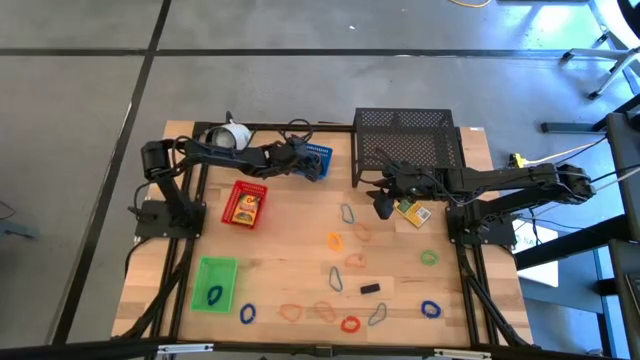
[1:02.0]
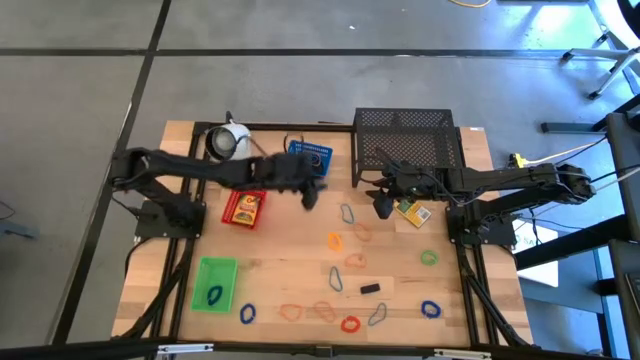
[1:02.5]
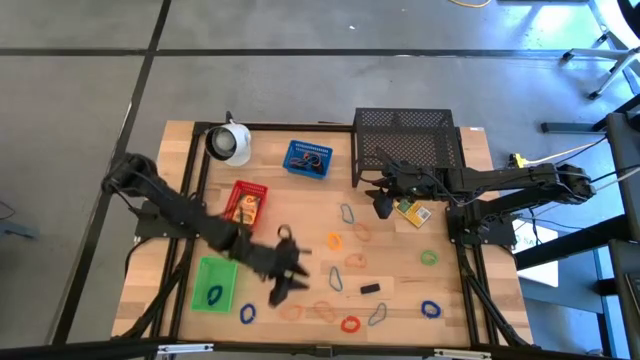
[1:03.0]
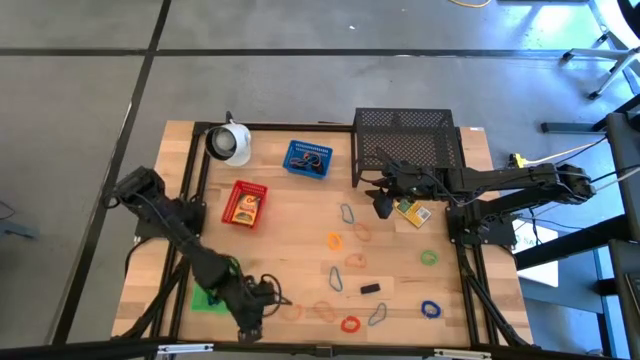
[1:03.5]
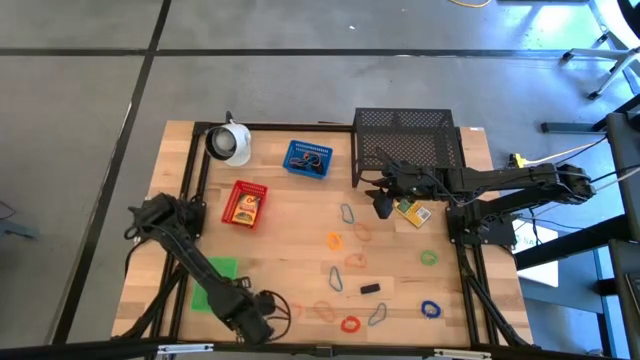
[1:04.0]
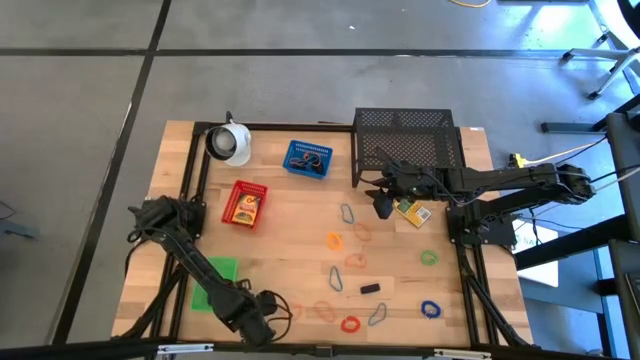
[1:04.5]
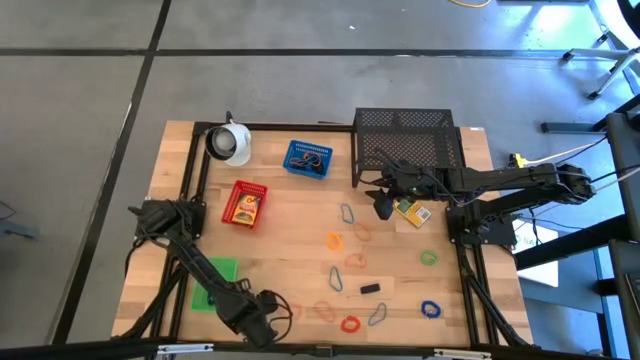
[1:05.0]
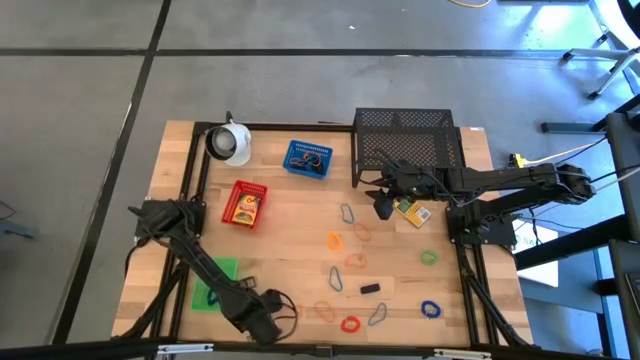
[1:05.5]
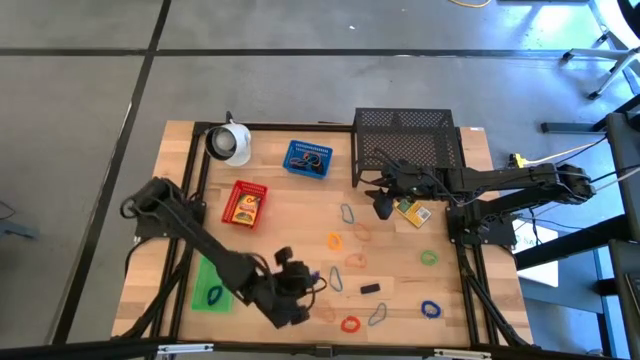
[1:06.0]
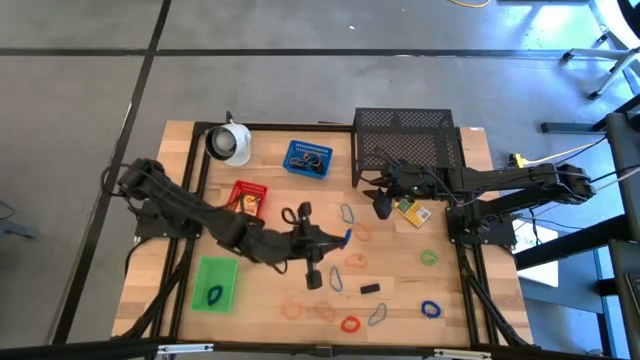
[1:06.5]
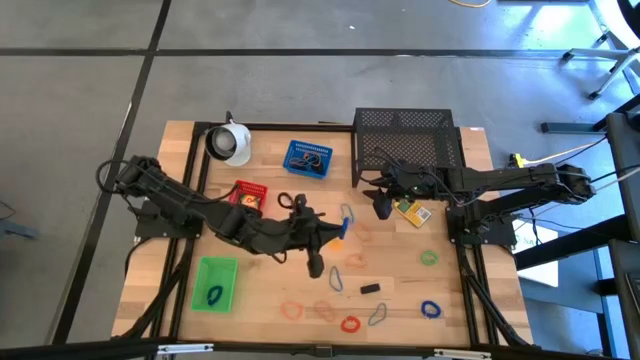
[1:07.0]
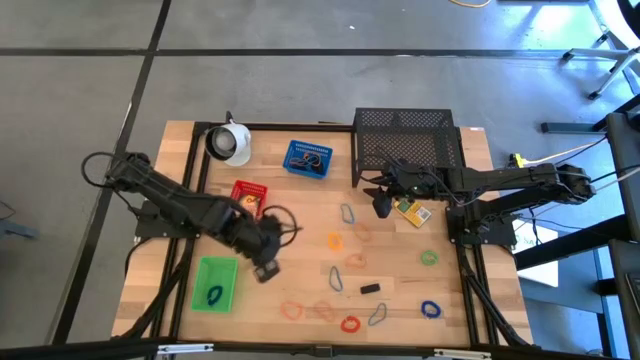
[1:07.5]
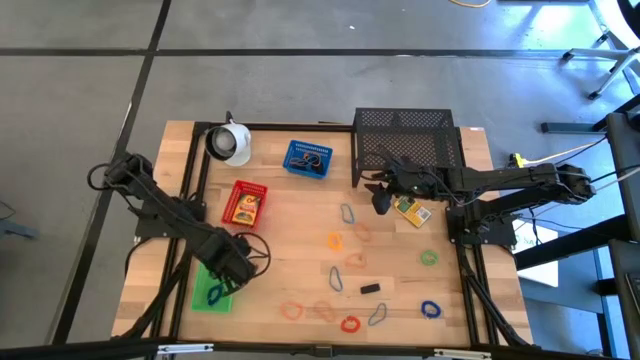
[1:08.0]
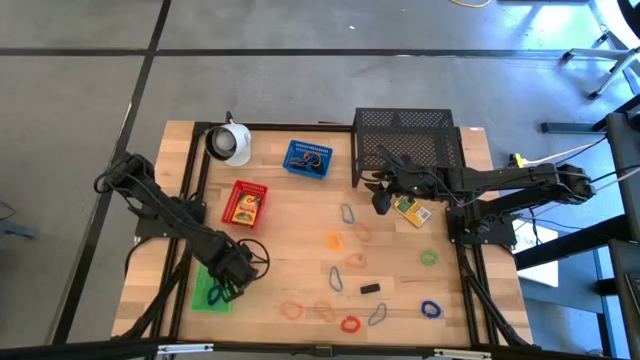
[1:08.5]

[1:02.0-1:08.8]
Task: Pick & Place Office Desk Supplies
Put the blue spring keychain into the green bin

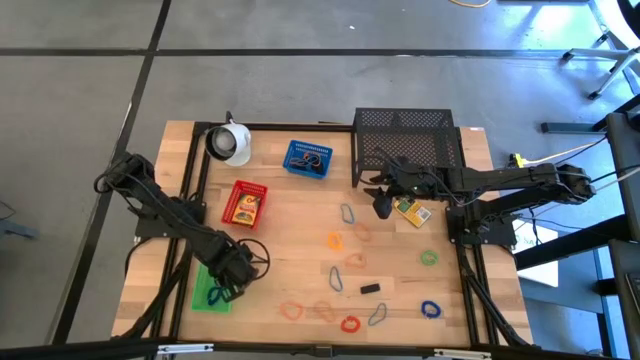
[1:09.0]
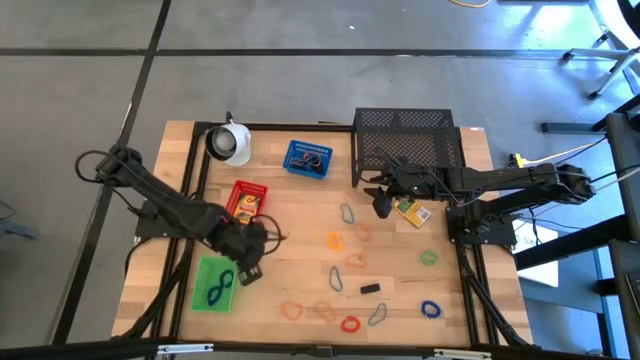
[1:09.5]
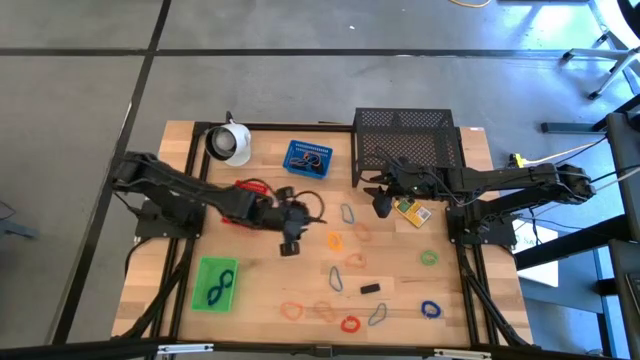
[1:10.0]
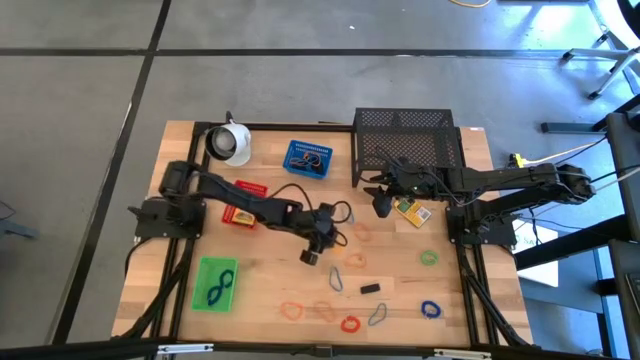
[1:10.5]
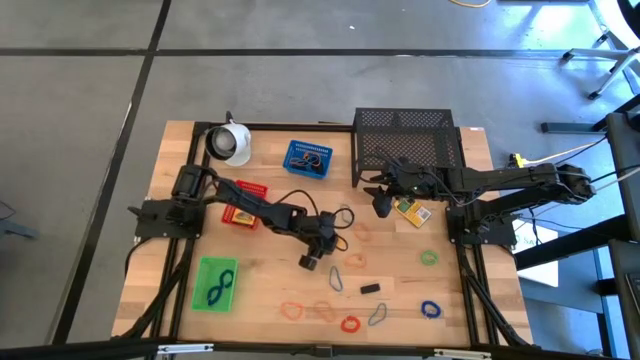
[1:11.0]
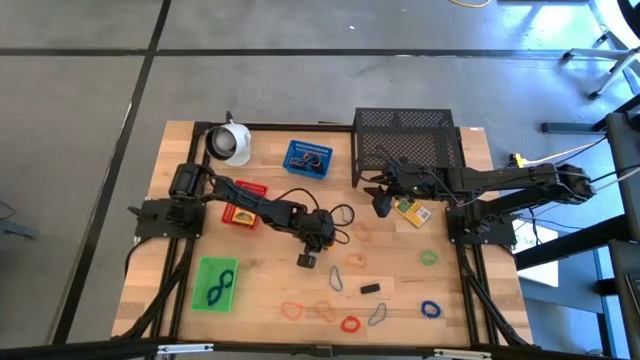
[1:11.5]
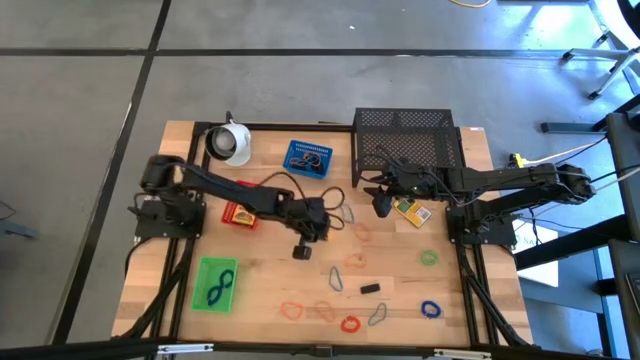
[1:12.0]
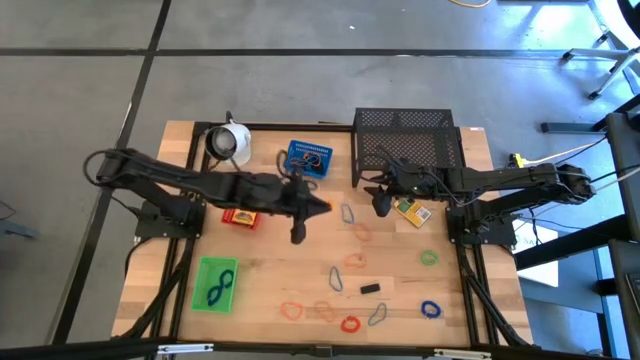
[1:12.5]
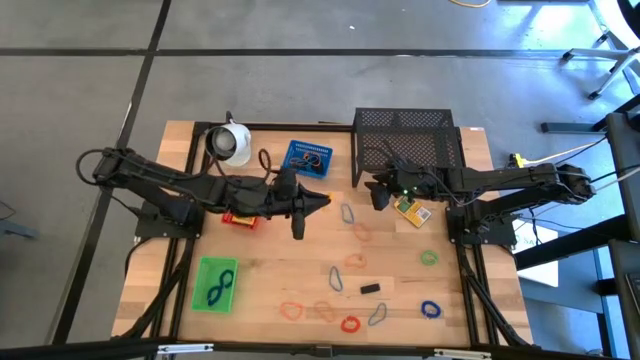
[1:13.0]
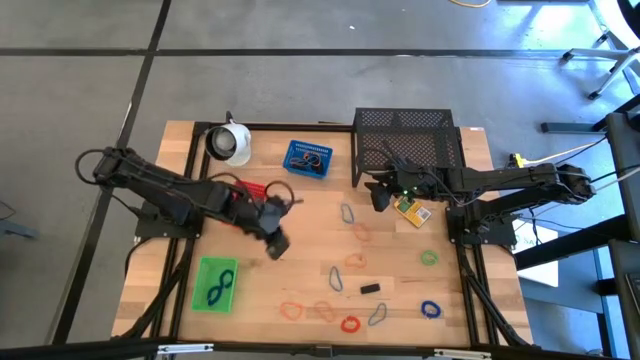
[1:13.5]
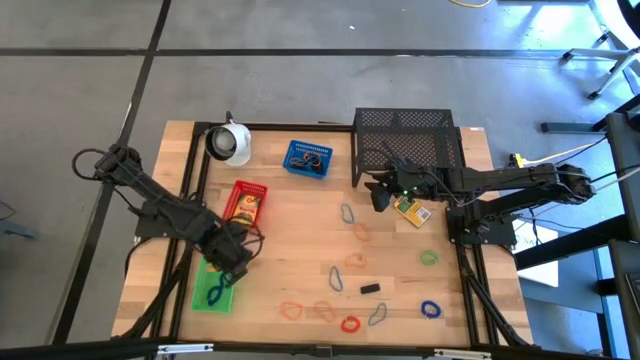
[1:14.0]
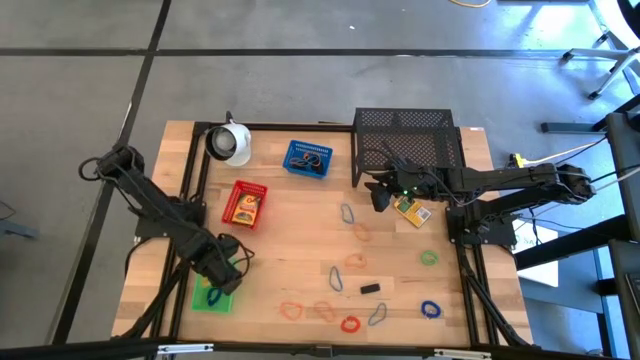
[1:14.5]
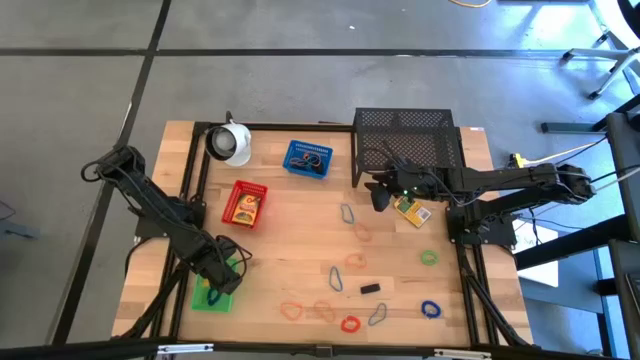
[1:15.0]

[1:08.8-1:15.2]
Put the yellow spring keychain into the green bin

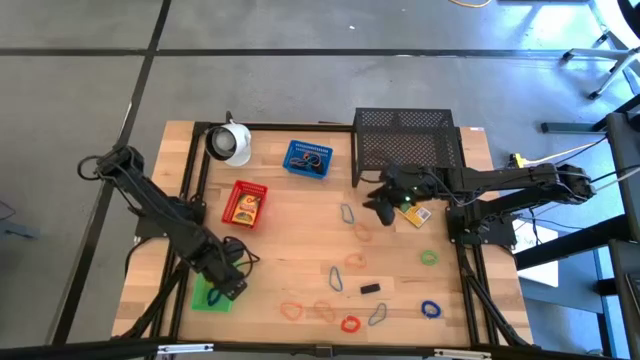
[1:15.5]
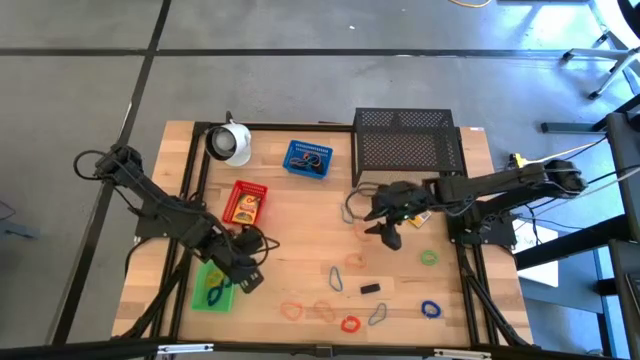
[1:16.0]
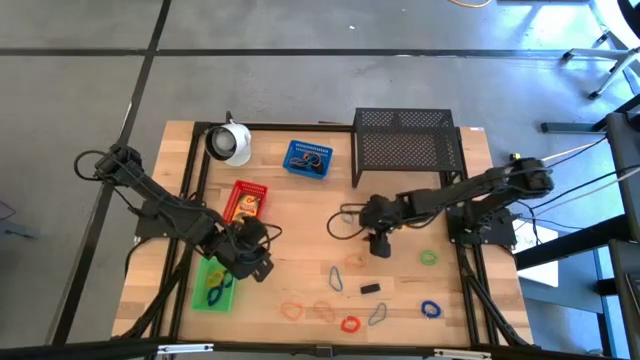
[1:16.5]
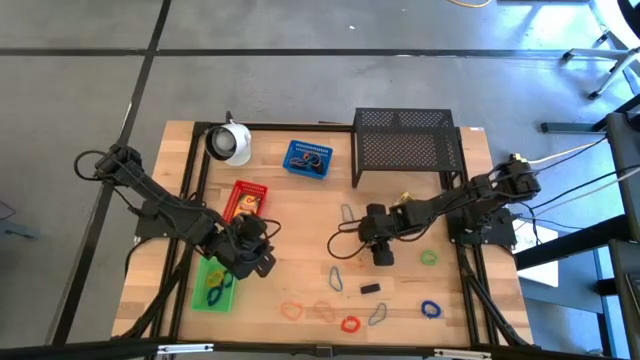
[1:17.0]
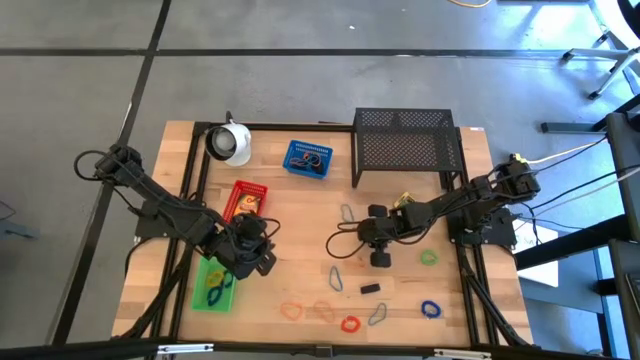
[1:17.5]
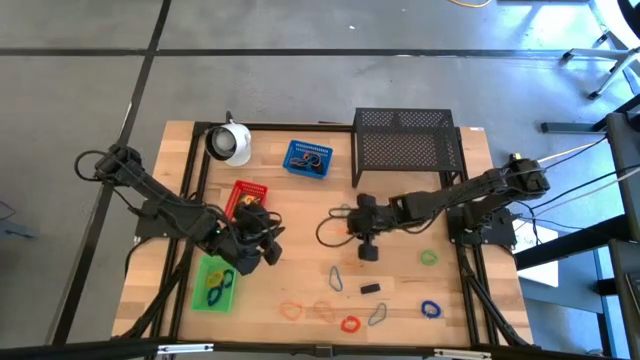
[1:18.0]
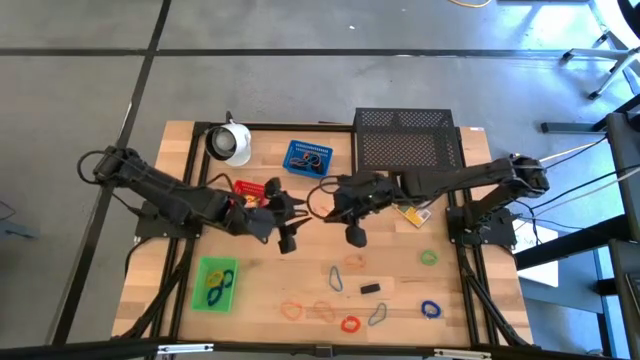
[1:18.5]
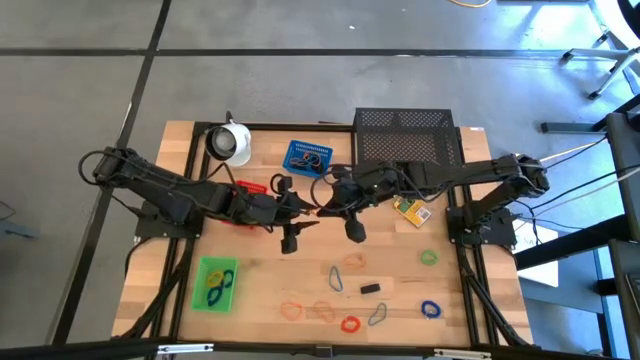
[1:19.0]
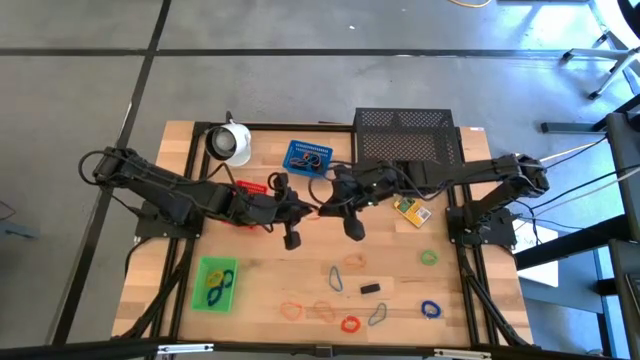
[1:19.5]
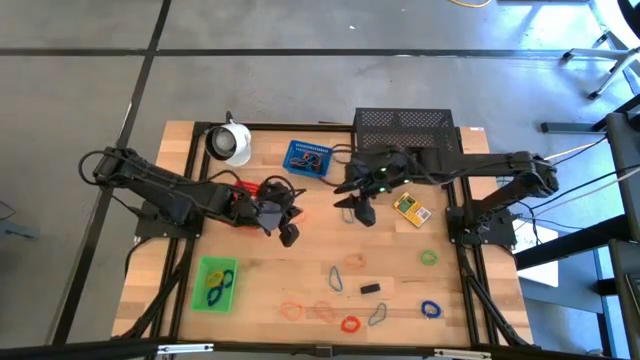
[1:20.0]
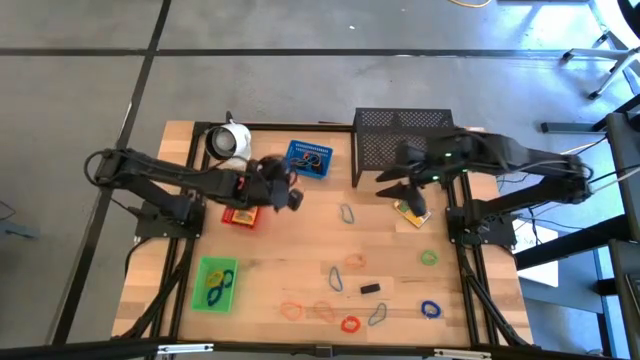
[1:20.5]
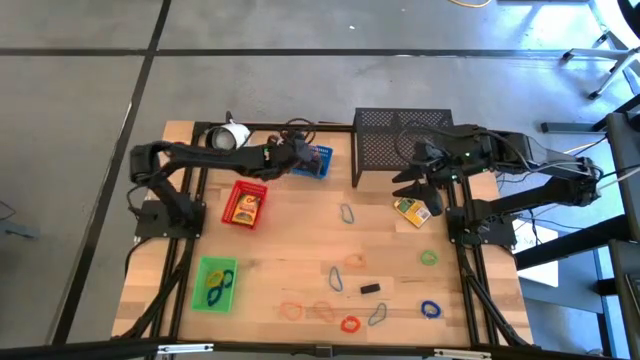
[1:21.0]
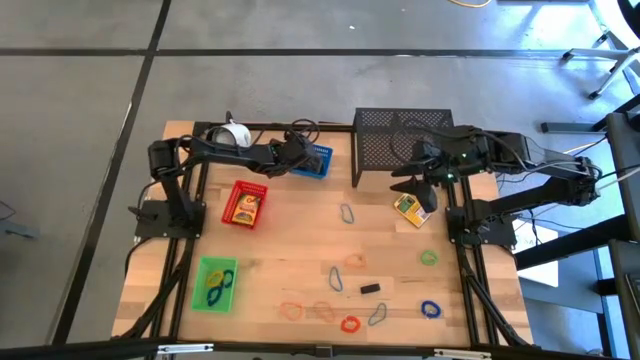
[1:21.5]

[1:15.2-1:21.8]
Put the orange rubber band into the blue bin
